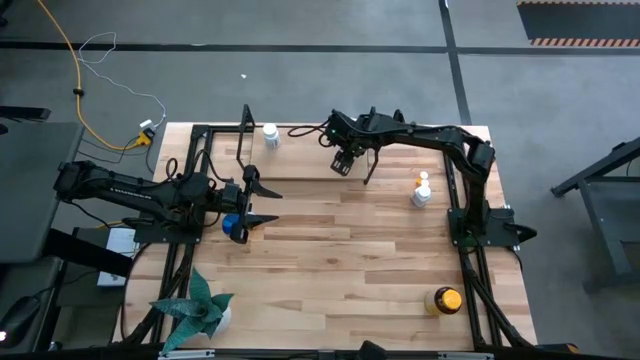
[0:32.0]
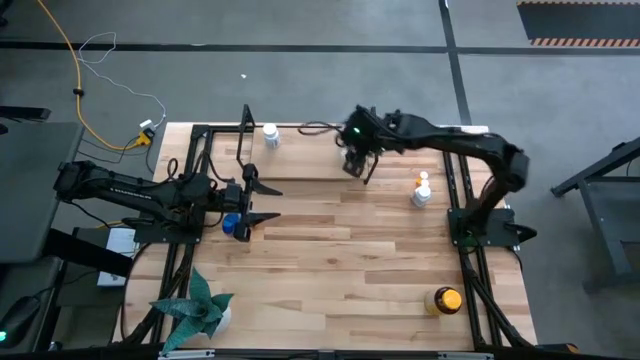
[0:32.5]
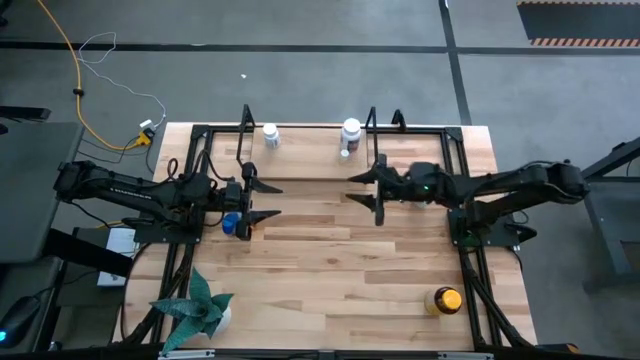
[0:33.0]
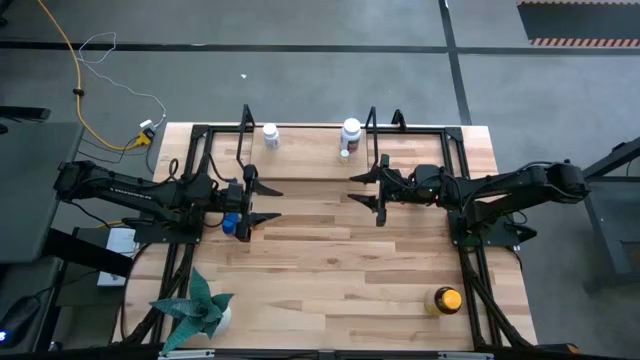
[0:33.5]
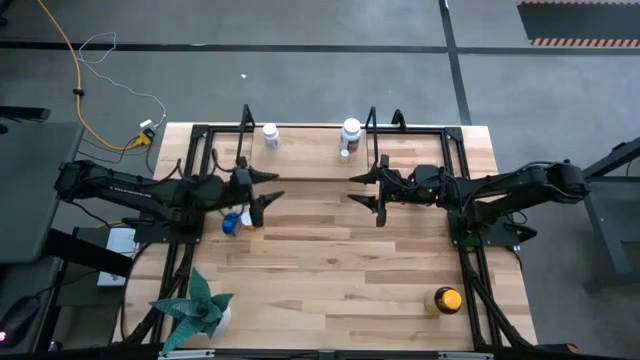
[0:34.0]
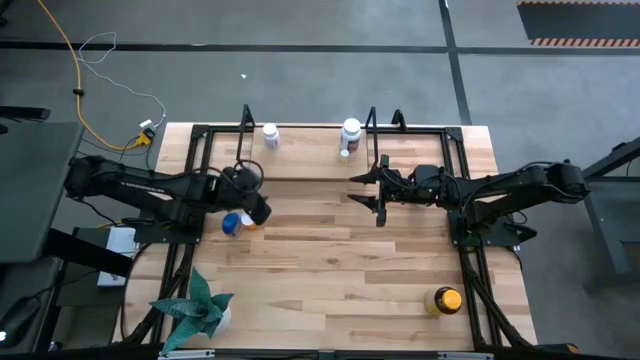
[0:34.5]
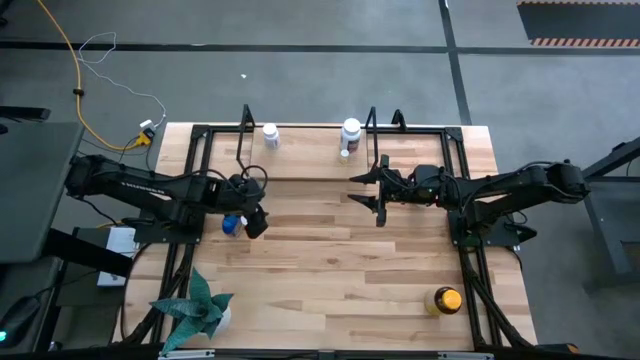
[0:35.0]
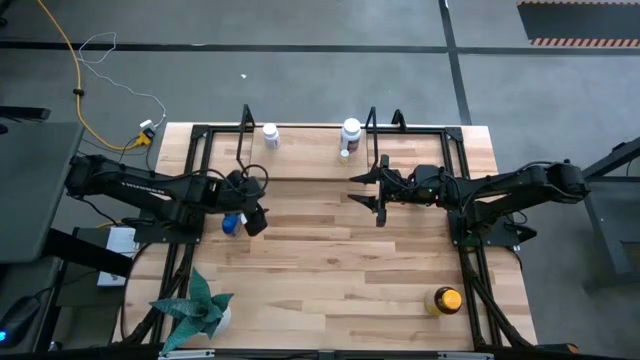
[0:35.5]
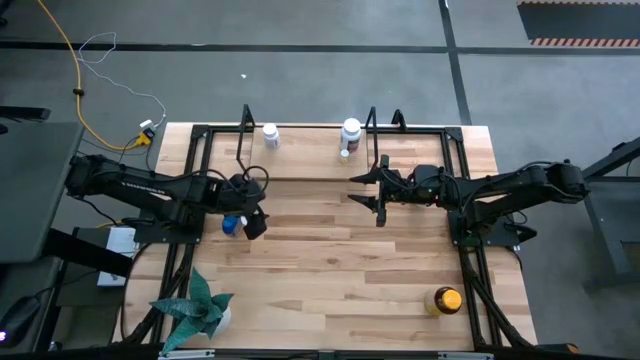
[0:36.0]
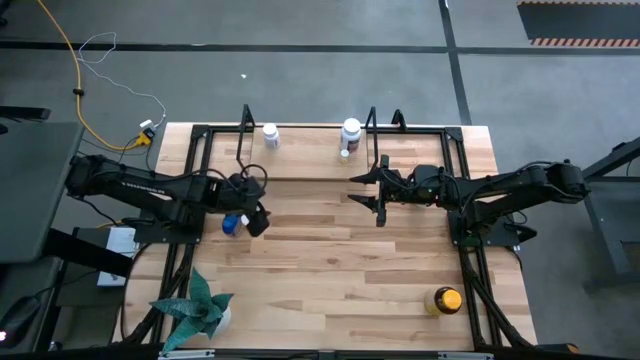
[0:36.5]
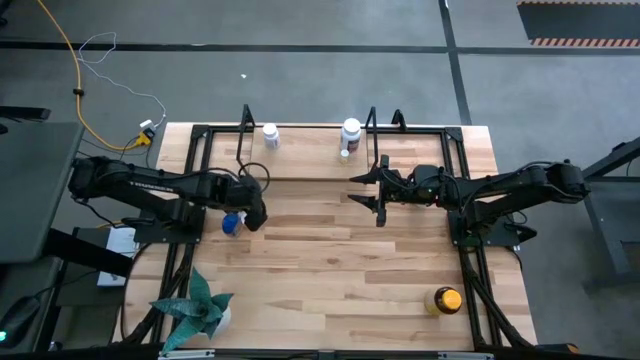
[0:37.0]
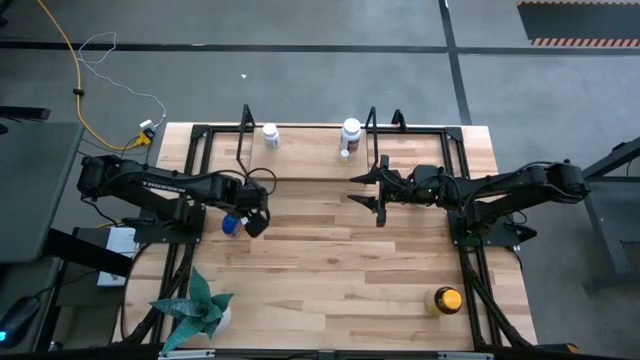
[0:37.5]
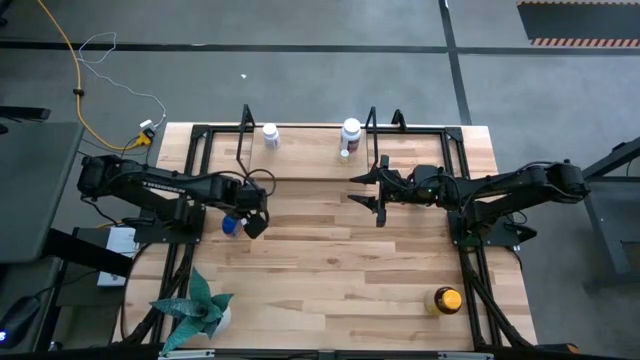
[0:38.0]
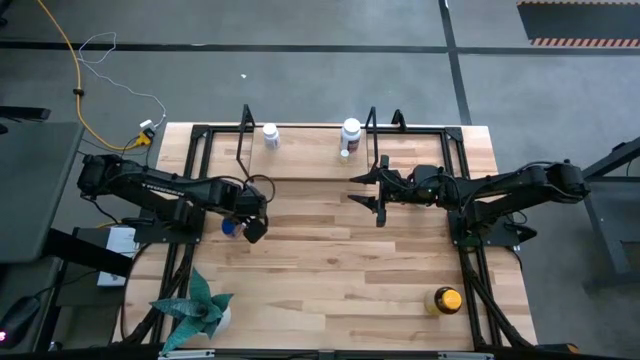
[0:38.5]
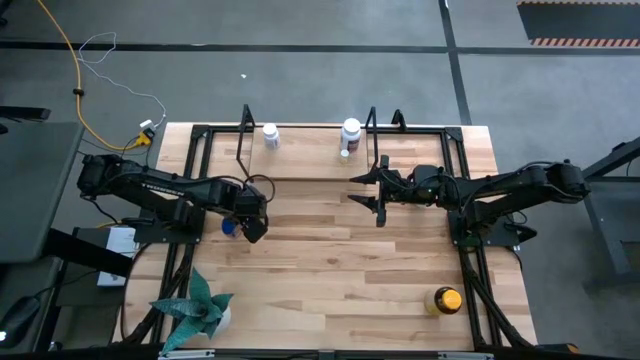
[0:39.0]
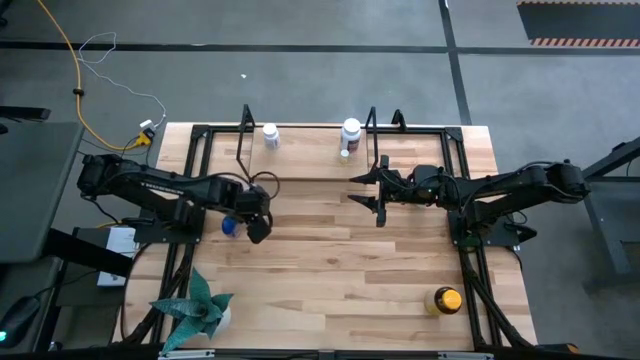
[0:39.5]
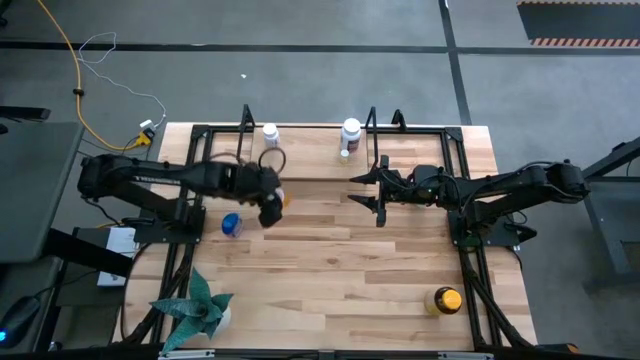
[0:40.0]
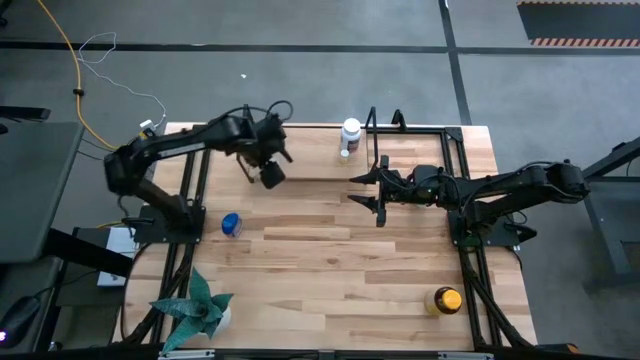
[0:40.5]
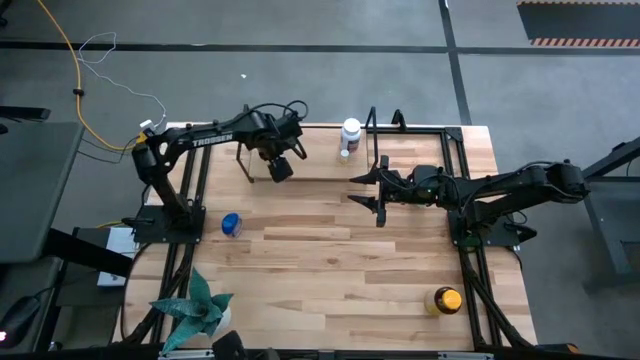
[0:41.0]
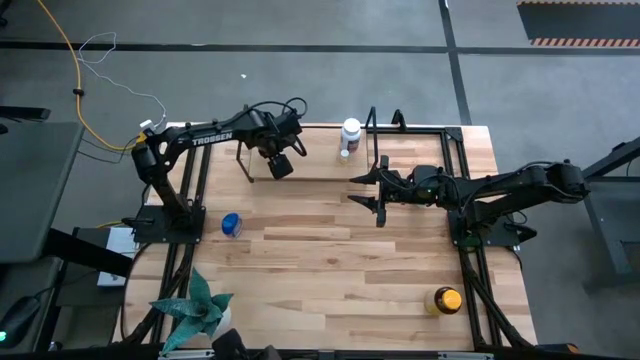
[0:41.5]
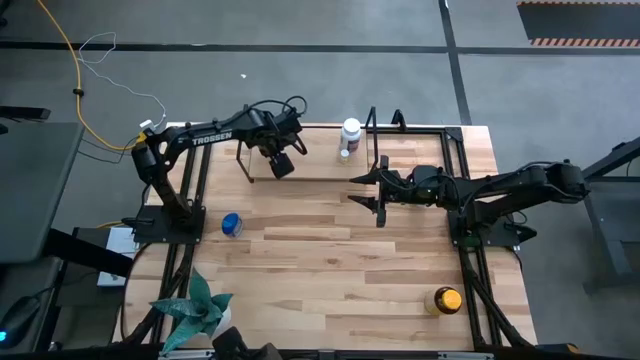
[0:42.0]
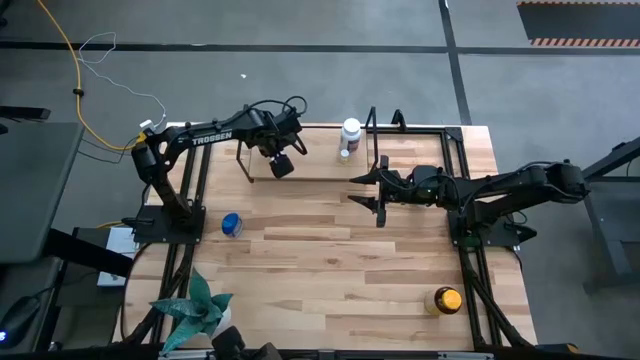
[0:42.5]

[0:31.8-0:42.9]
Task: Pick and place medicine bottles onto shelf by color
Put the left orange pill bottle on the shelf

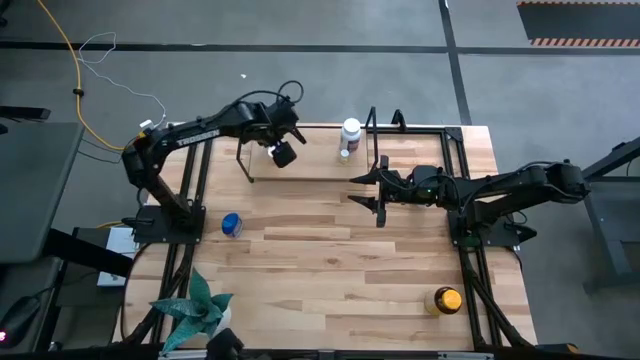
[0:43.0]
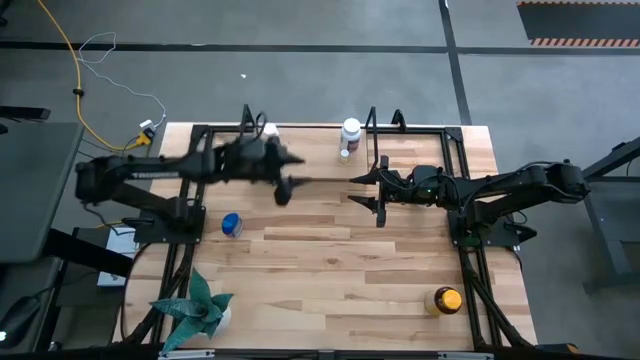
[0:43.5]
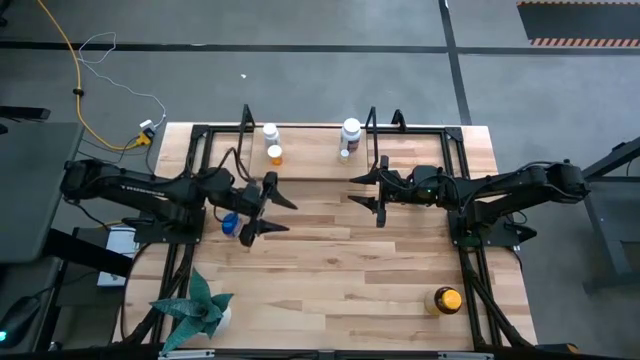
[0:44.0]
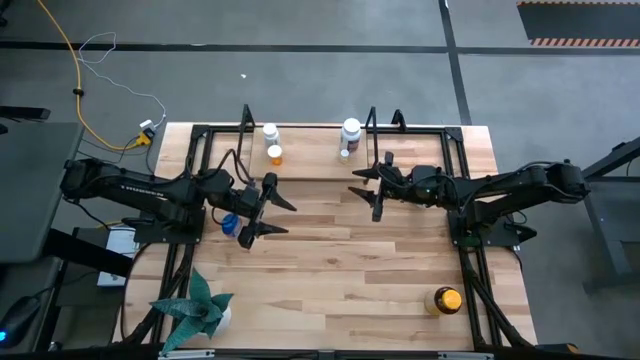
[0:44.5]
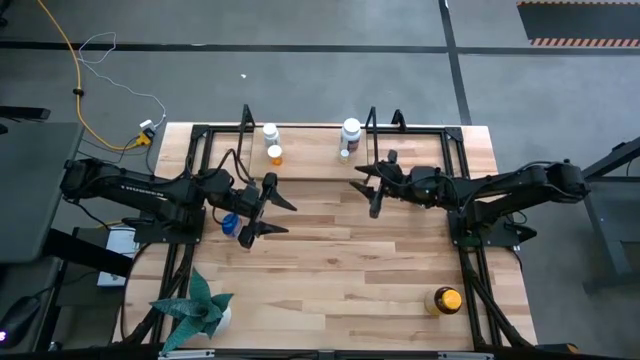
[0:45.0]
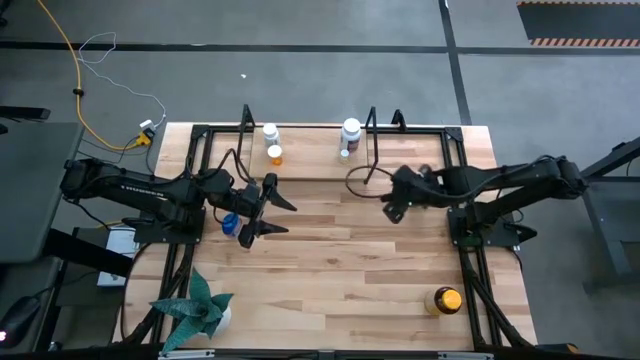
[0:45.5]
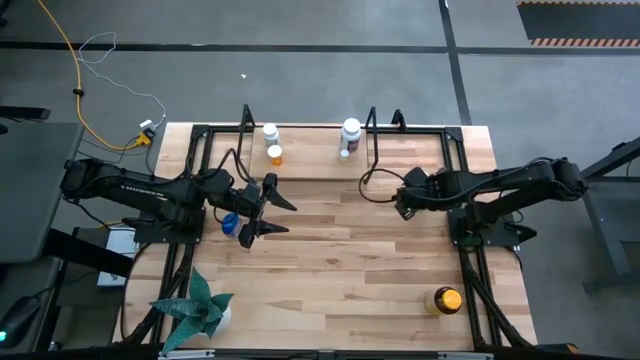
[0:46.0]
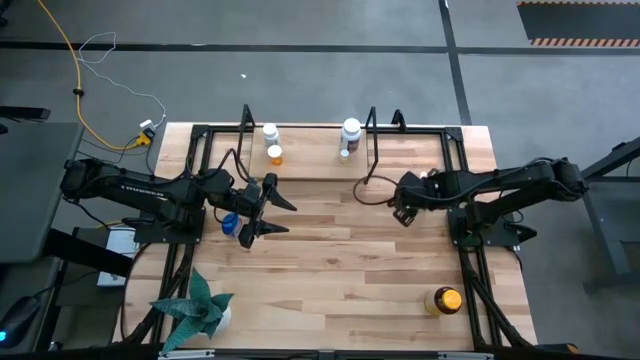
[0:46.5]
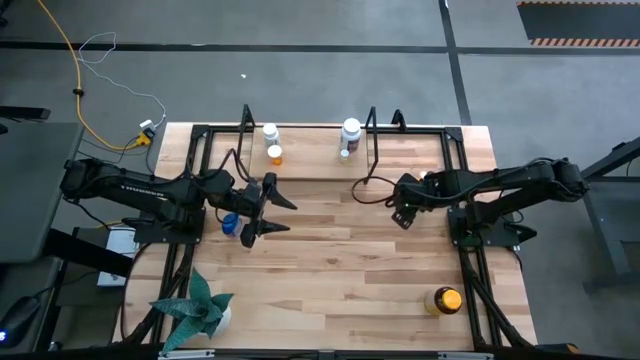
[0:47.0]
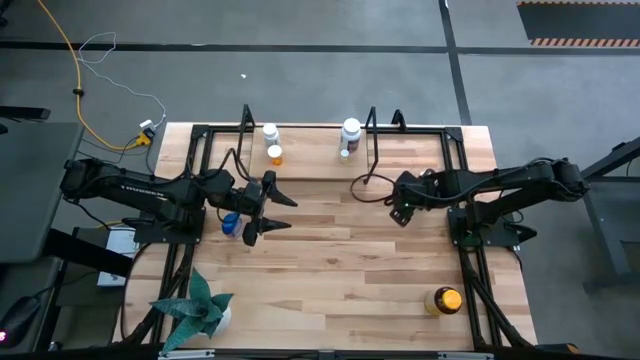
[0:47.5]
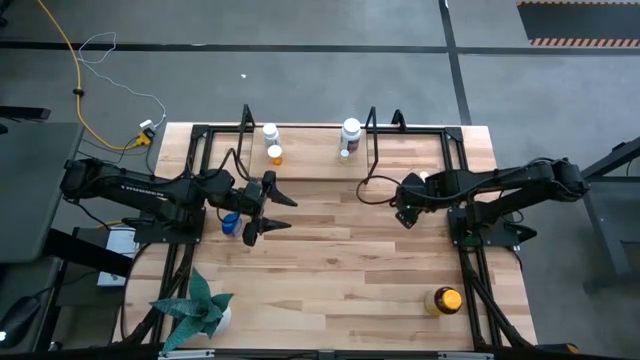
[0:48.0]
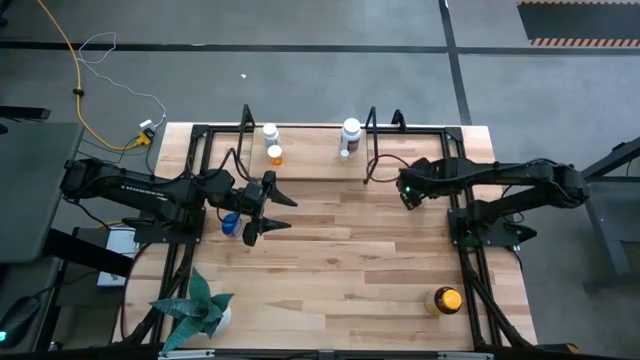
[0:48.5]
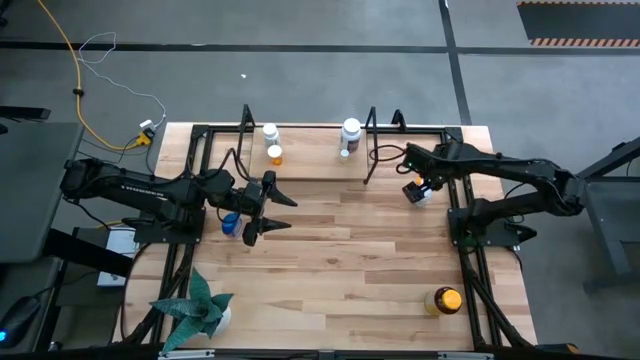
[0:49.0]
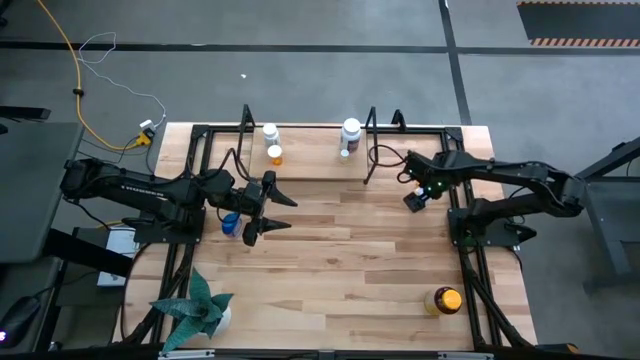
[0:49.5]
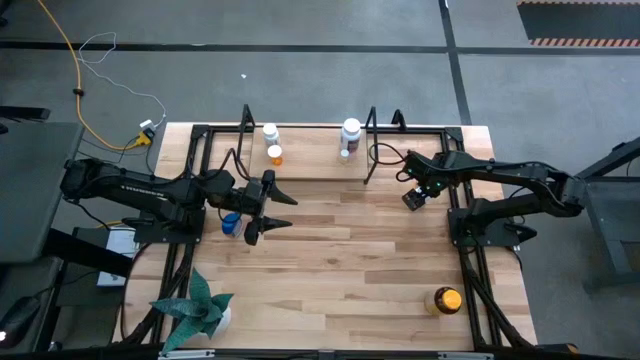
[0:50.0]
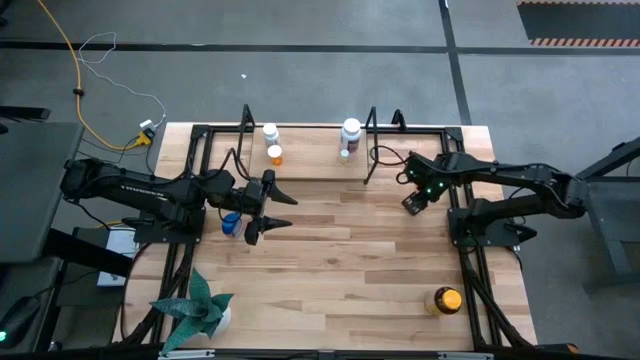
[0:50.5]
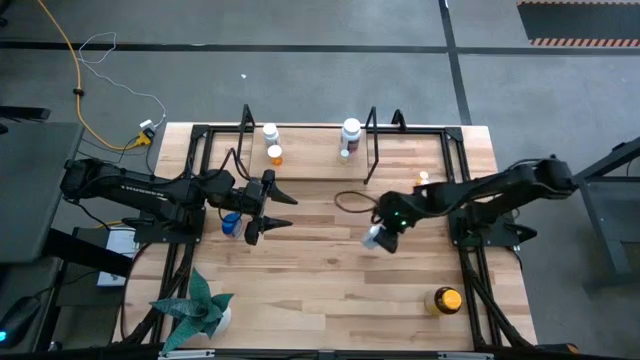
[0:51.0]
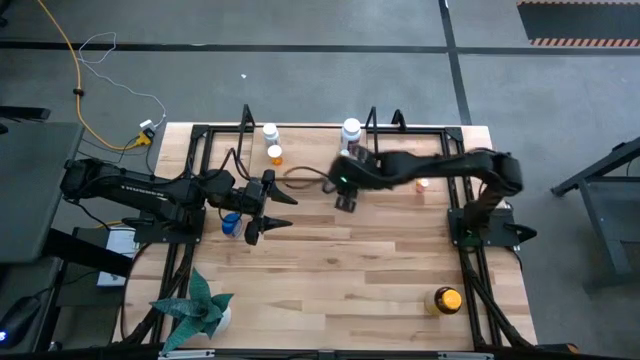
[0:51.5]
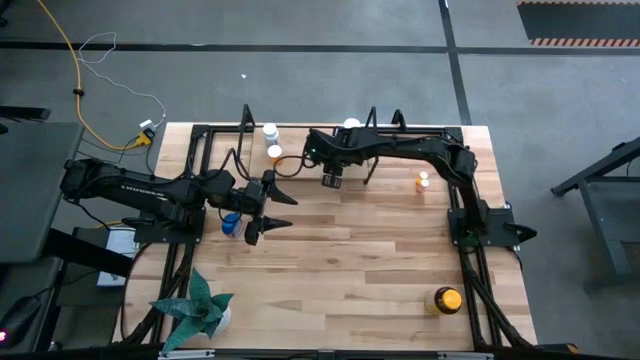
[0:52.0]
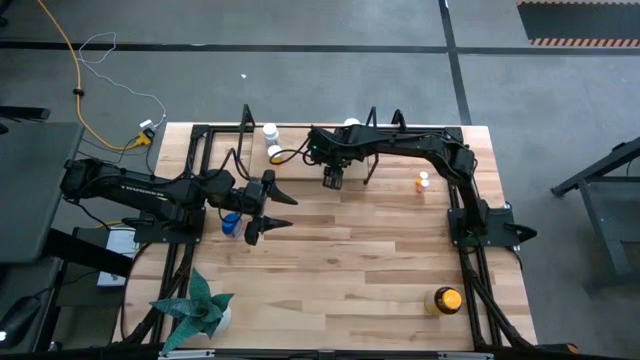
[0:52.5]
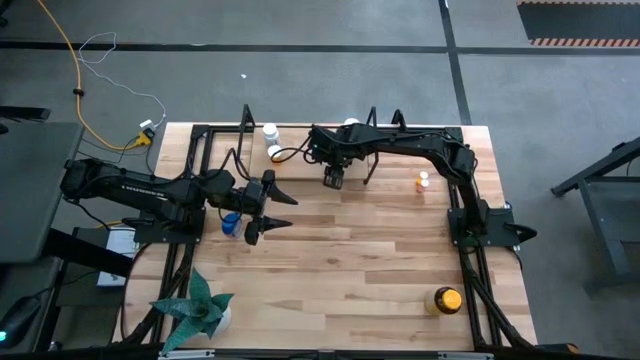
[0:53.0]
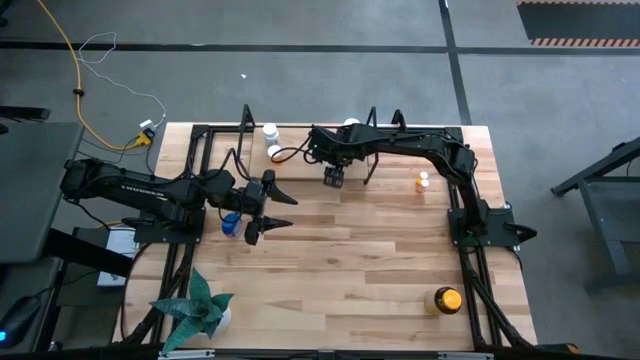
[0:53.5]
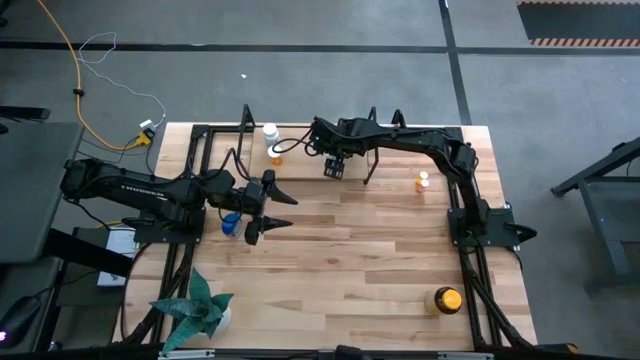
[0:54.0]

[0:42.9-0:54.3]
Put the small white pill bottle on the shelf
